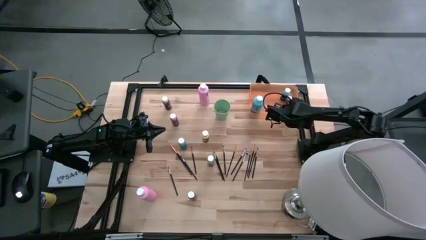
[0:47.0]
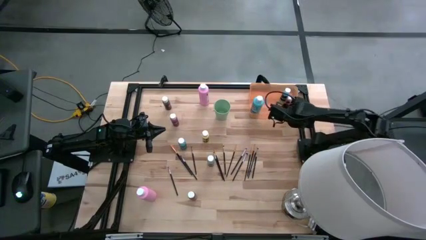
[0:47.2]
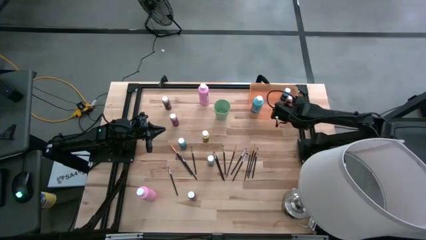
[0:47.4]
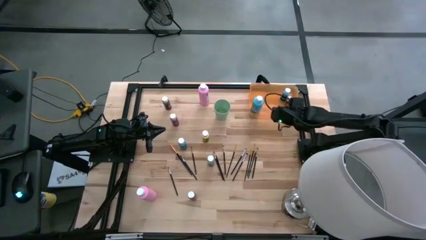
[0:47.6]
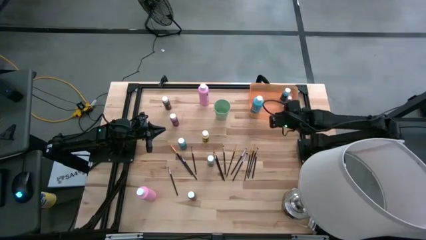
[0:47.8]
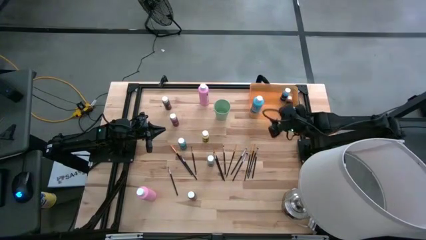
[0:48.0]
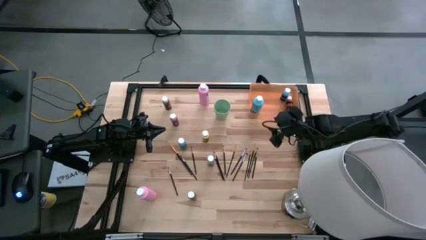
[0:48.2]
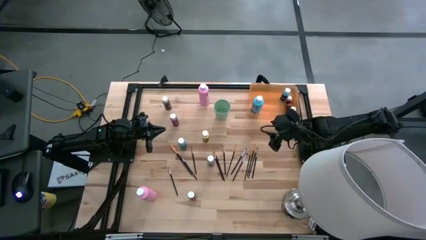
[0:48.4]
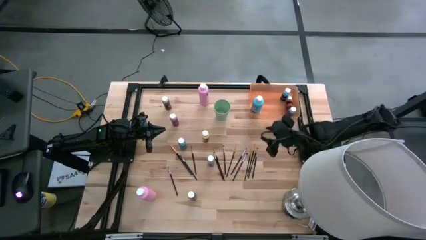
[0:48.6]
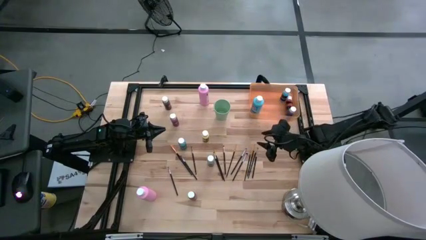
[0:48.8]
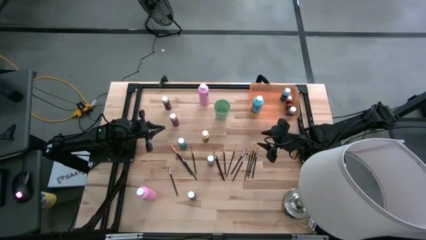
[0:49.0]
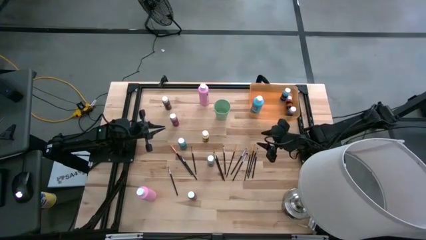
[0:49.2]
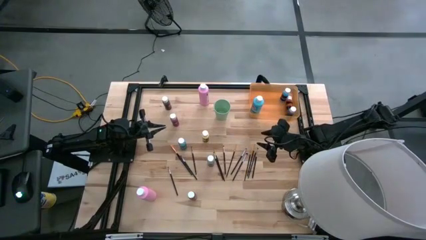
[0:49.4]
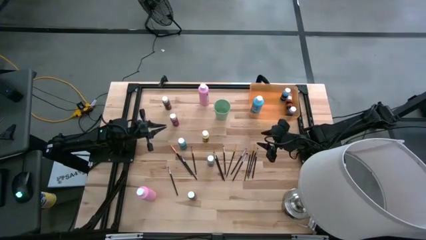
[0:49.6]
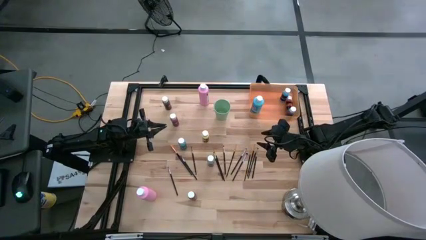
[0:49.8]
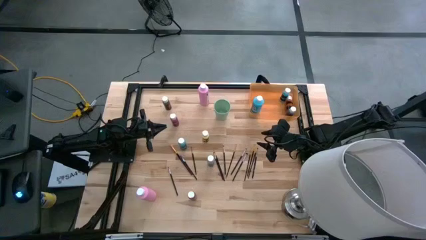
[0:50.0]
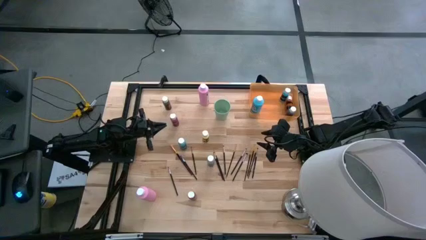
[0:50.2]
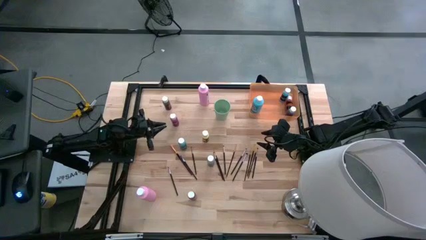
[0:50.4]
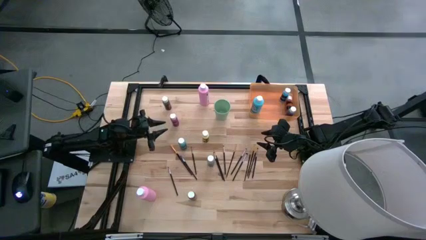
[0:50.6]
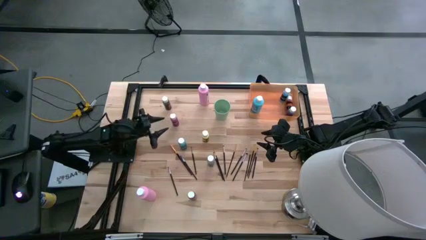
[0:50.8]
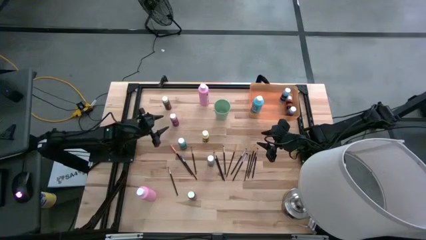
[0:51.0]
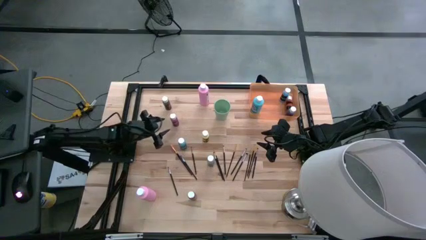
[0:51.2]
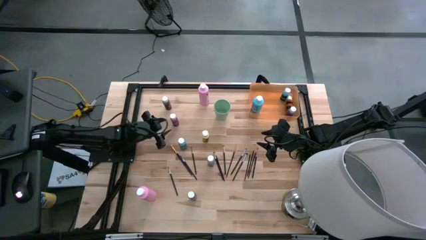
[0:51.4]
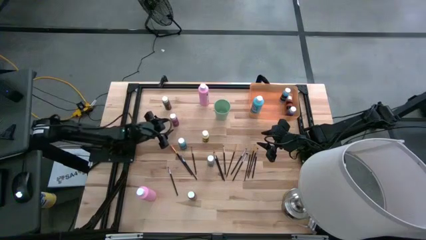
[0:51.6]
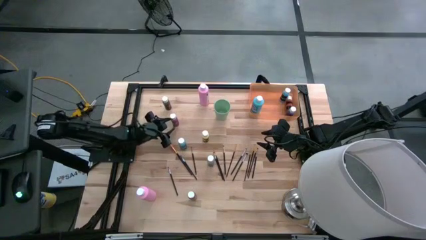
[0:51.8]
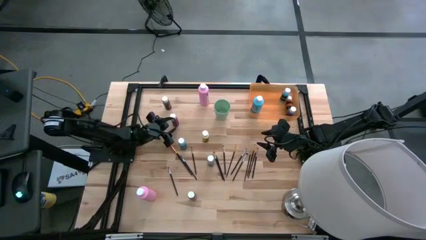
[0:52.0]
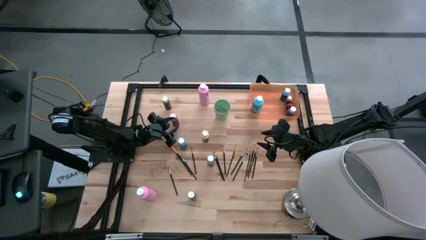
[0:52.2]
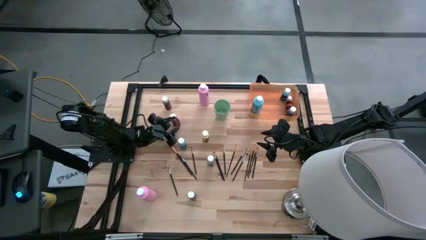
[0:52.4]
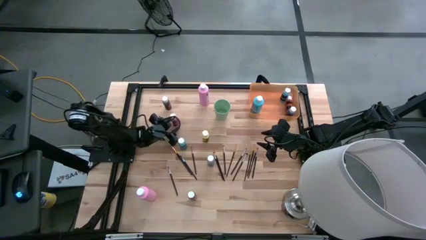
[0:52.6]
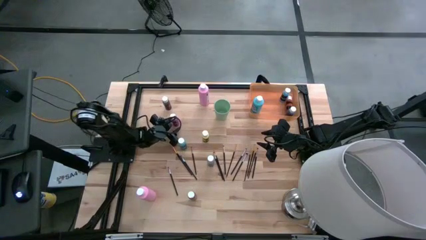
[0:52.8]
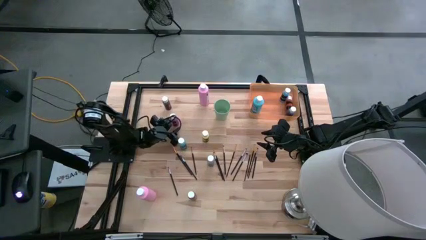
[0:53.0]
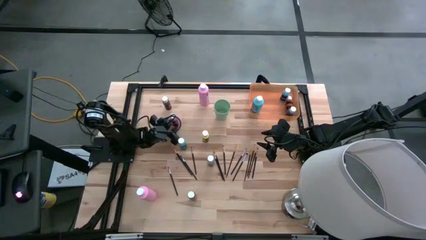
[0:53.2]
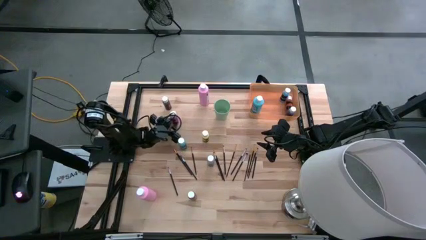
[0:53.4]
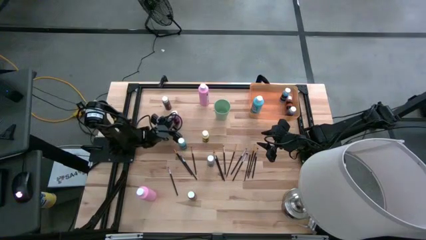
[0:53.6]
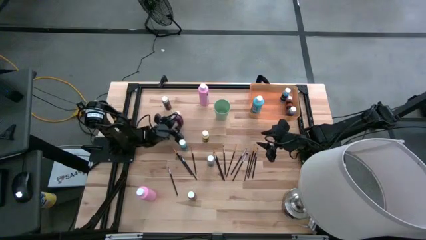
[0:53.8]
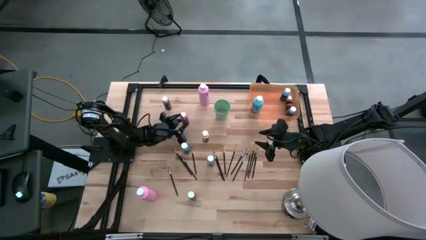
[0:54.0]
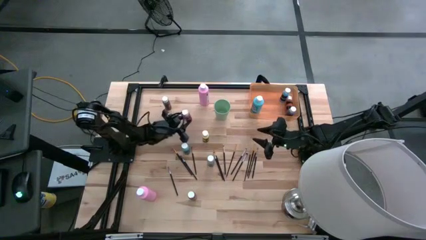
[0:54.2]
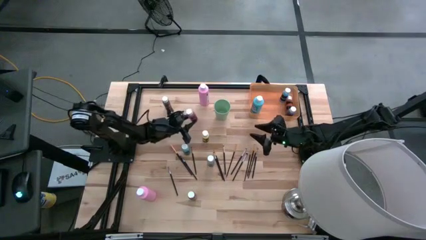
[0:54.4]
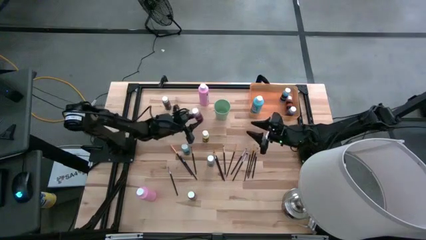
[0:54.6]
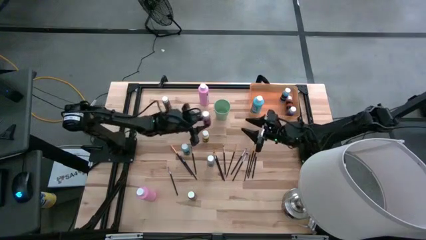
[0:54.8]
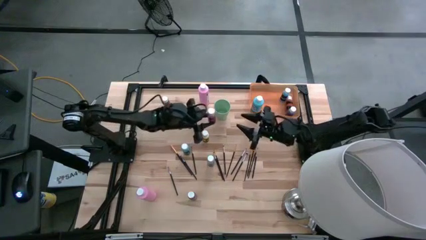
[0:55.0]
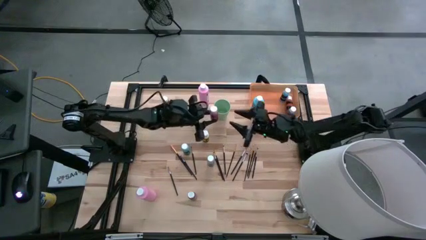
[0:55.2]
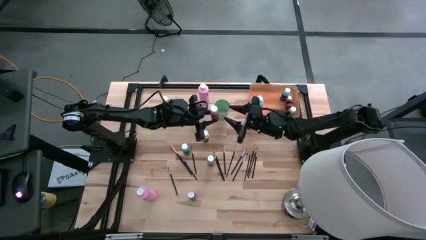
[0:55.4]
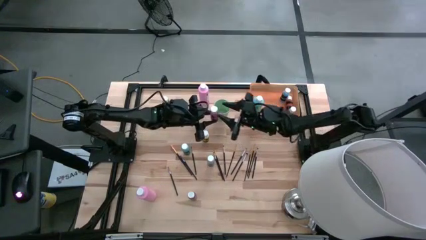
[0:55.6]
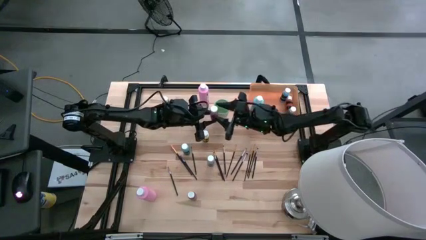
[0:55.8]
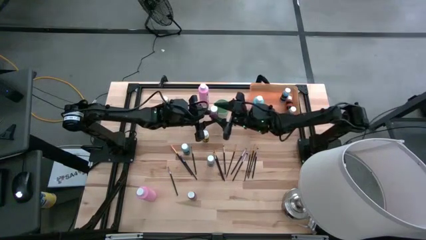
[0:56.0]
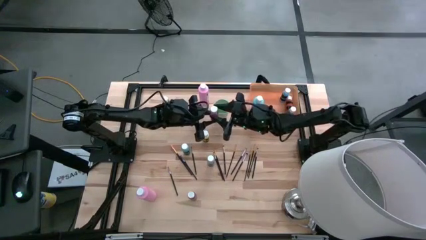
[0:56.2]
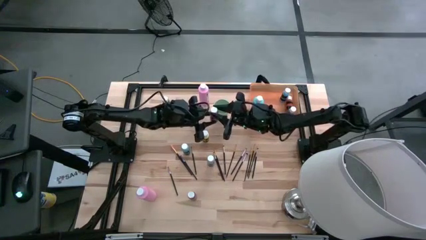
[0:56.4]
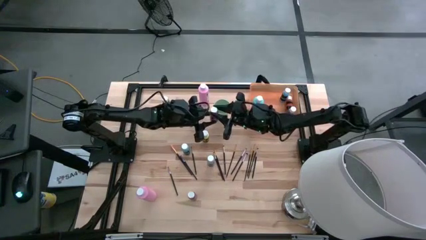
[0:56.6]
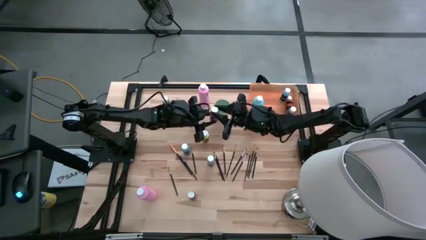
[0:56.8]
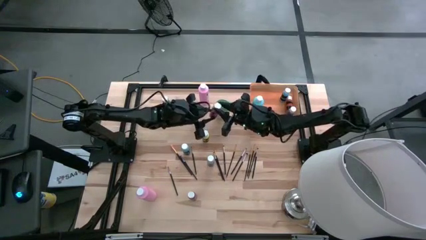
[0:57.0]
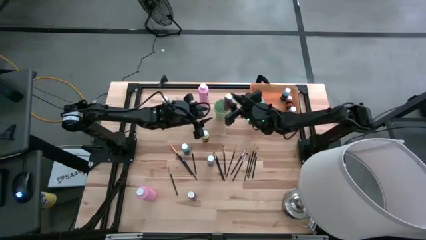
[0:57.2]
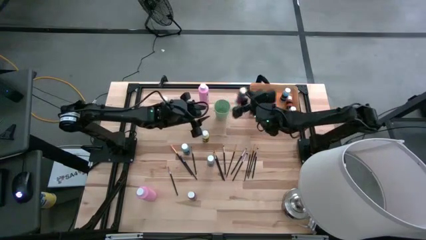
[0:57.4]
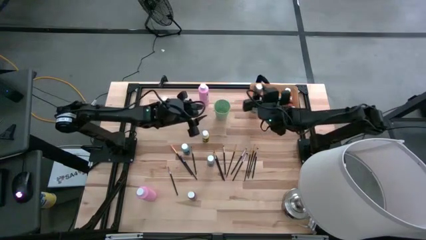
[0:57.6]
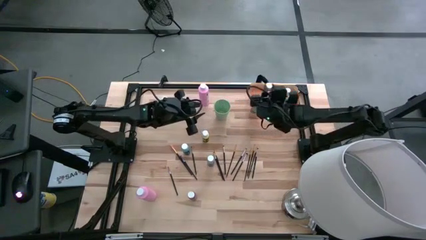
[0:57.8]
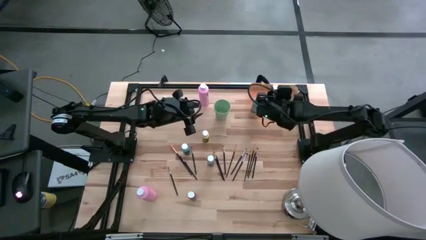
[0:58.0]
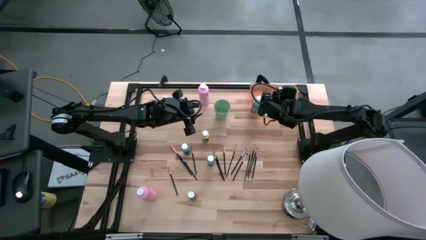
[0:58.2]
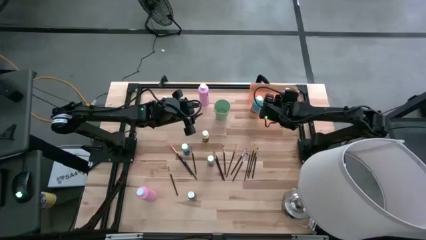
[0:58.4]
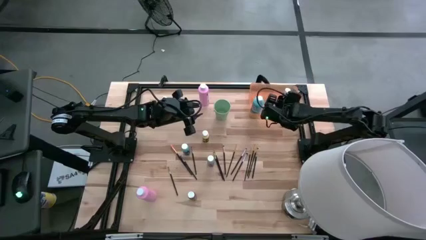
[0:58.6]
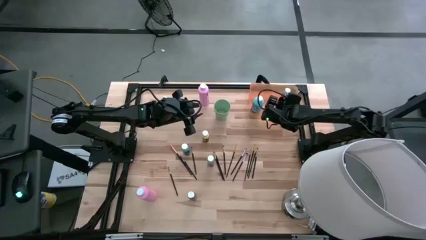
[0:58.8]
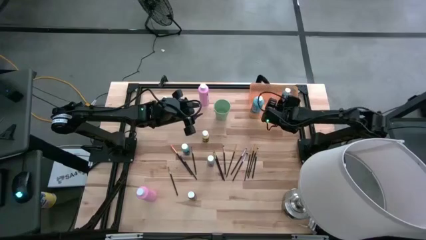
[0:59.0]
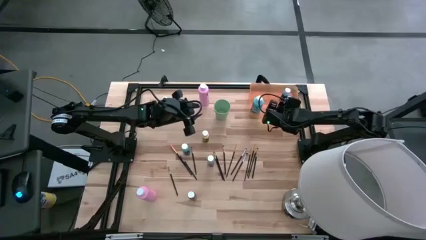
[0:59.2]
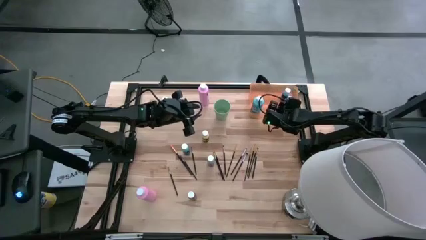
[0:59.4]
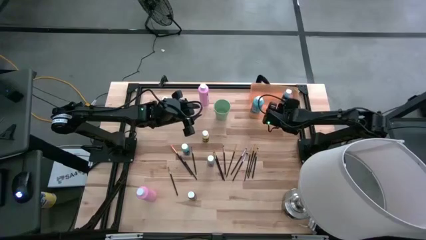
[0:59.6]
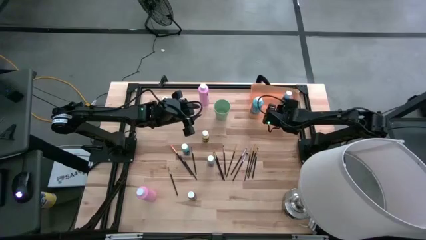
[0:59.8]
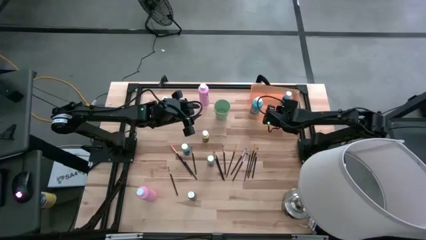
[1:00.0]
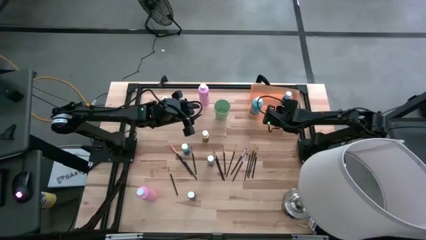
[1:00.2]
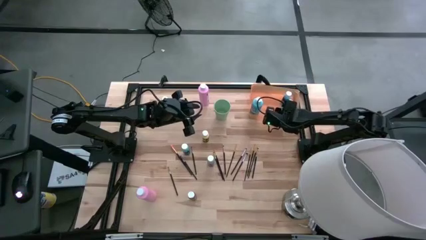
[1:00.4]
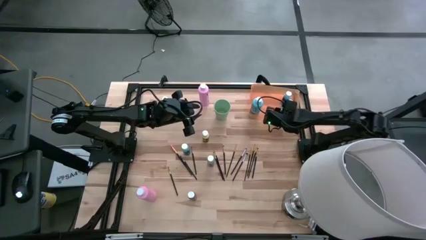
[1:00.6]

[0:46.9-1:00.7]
Task: Pick & Place Paint Supplies
Put the small dark pink paint bottle into the orange bin

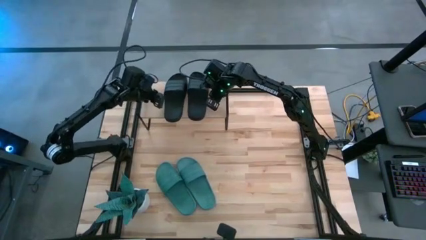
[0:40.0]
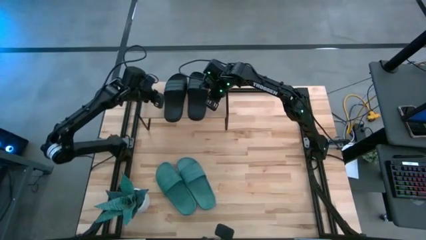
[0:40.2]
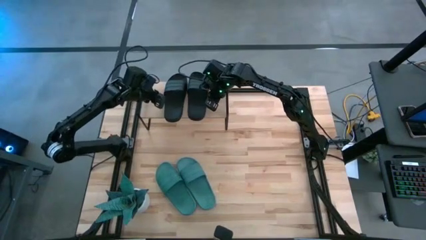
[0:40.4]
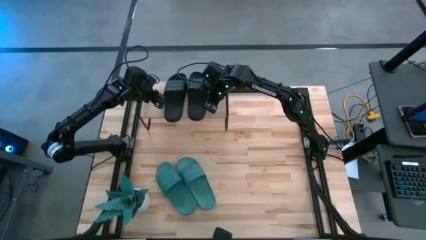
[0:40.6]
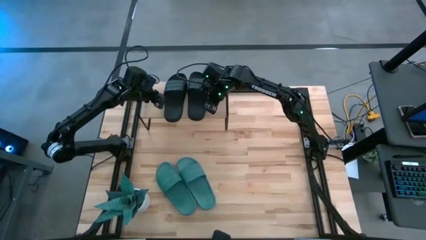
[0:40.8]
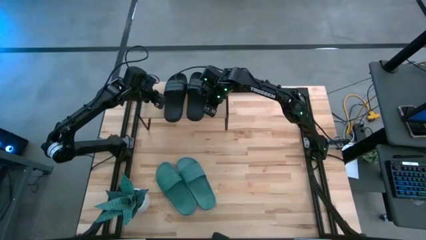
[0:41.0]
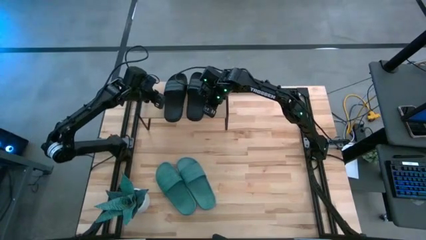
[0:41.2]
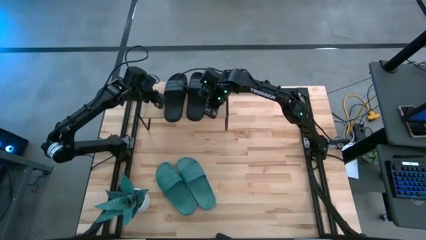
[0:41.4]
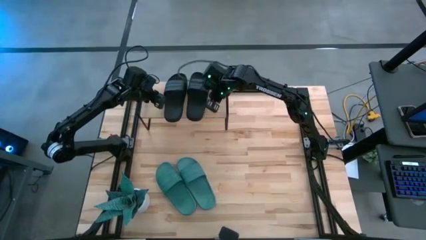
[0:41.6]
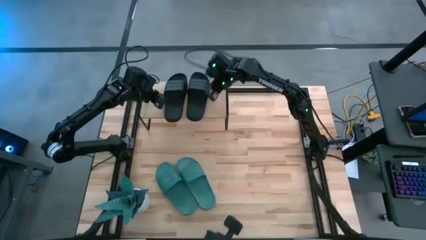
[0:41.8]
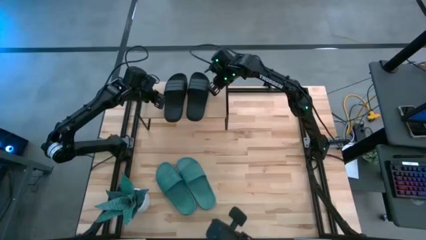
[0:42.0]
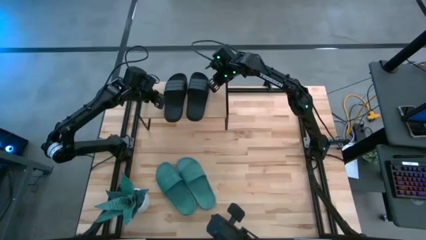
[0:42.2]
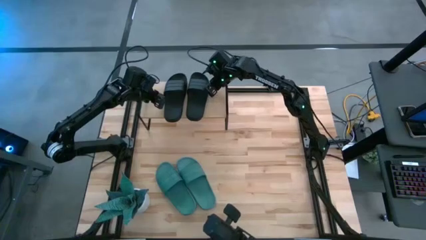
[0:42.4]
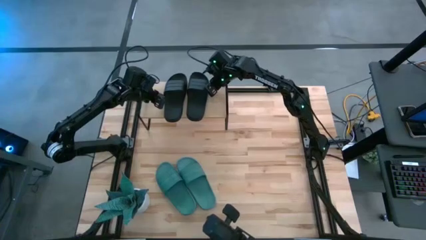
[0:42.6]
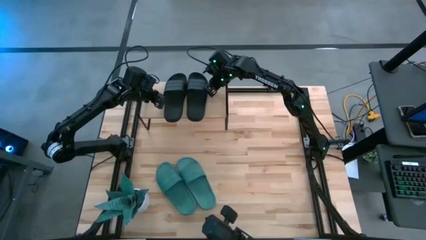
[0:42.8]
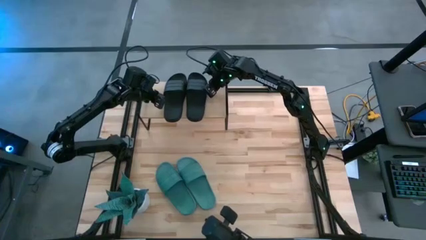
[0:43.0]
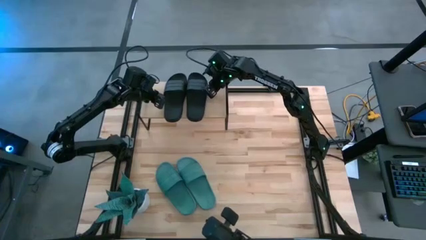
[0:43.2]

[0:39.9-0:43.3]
Task: Pick and place slides into the shelf
Adjust the black slide
